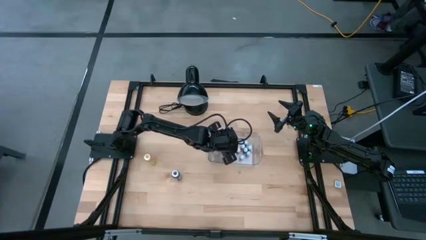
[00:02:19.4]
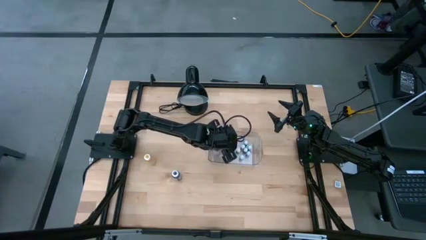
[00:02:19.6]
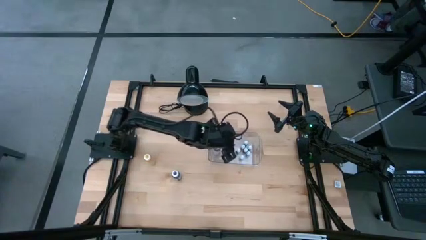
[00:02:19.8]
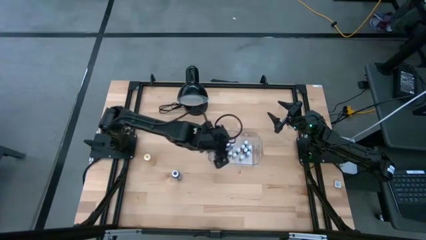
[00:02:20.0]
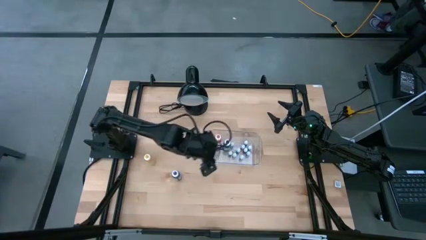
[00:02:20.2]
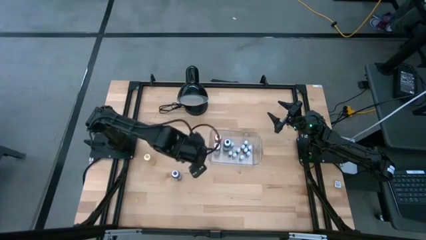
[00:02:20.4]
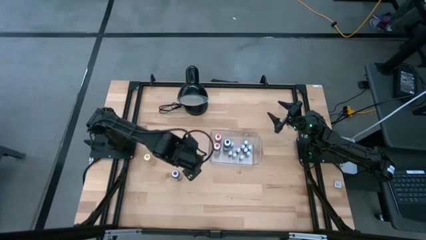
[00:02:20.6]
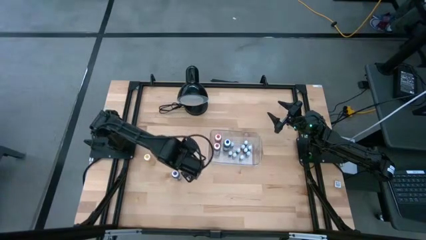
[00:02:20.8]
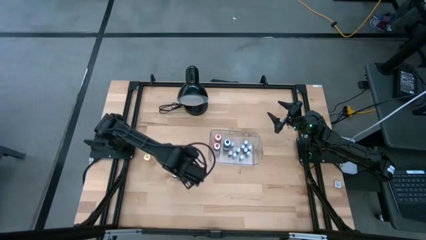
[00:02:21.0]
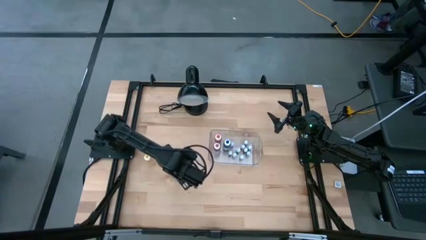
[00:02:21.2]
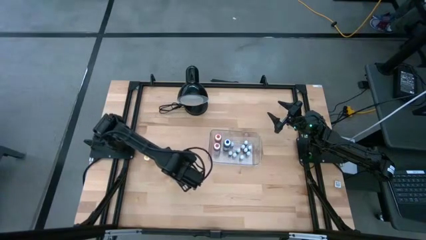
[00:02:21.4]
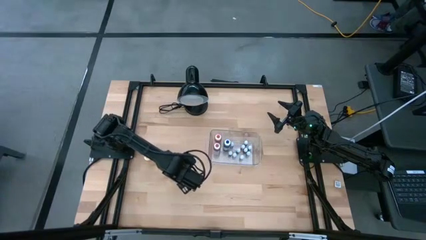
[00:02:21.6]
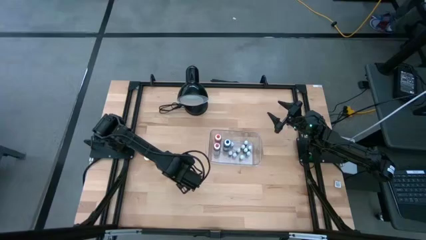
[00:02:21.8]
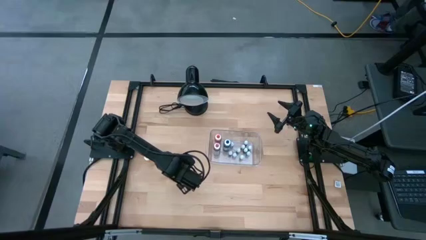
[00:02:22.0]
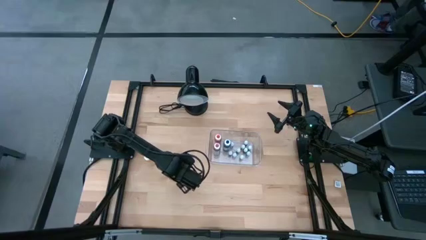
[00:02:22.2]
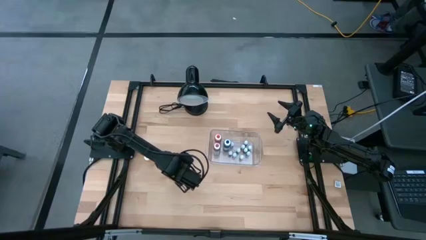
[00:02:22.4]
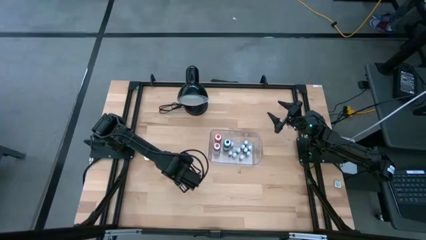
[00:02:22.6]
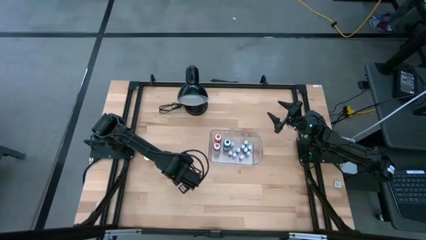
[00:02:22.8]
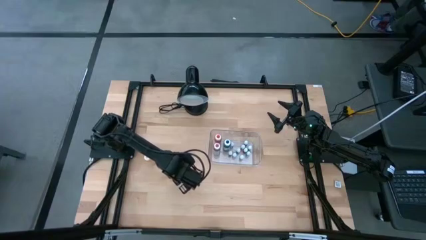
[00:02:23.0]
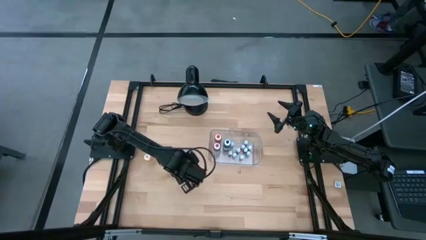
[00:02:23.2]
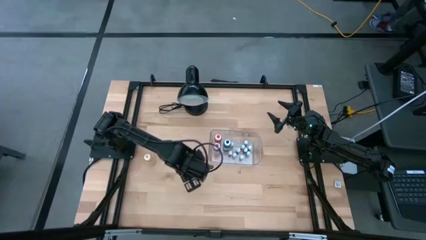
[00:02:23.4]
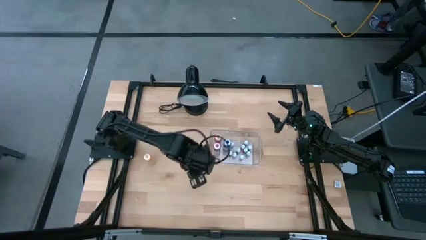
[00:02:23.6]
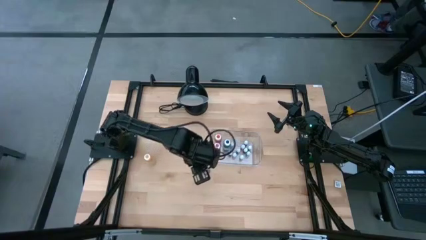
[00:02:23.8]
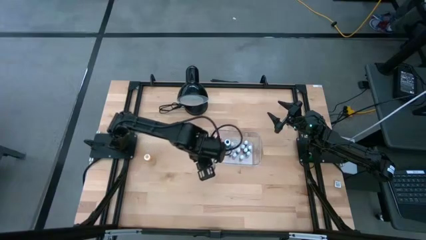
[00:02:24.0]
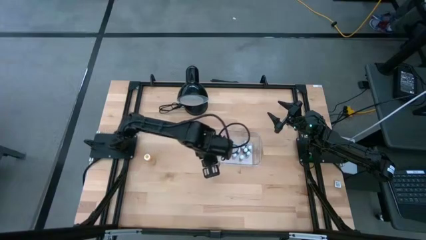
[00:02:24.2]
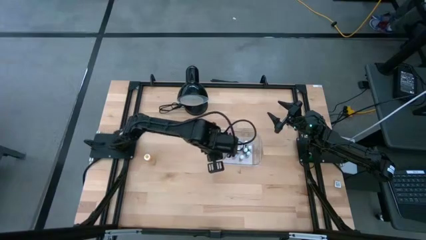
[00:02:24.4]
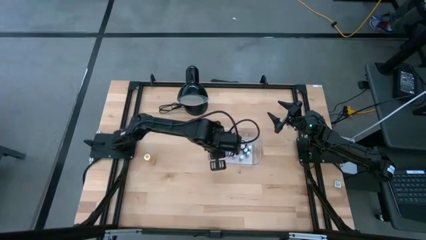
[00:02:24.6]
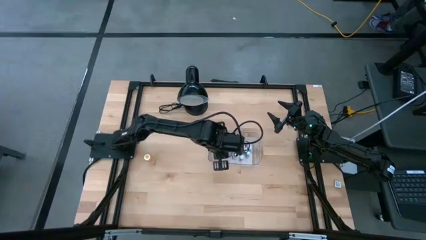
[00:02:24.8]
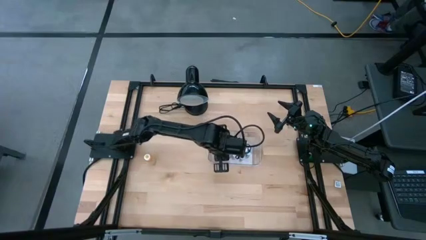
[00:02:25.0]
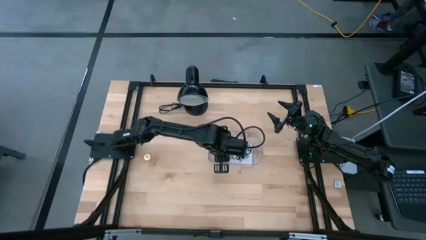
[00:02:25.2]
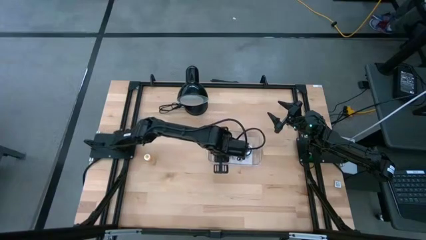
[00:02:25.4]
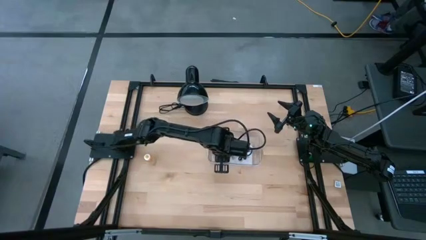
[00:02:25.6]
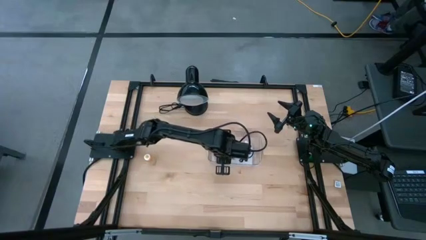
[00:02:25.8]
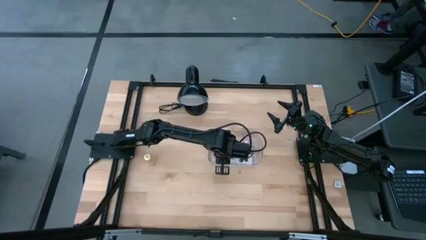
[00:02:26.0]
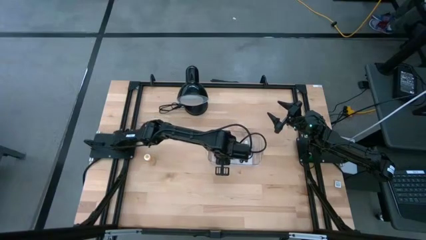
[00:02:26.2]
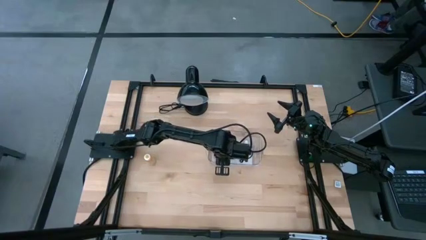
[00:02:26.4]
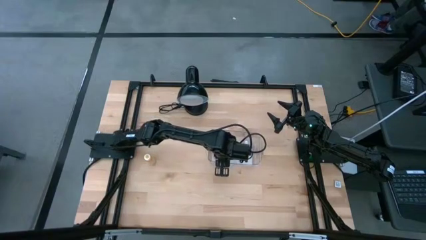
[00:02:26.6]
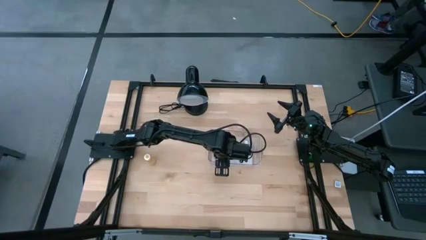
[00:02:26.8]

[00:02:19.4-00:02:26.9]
Task: Pick & Place food coloring
Put the big purple food coloring bottle into the transparent bin

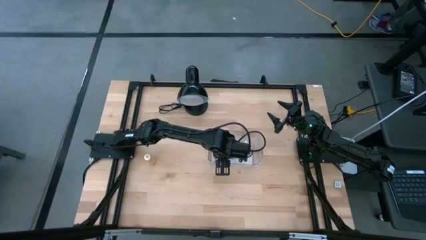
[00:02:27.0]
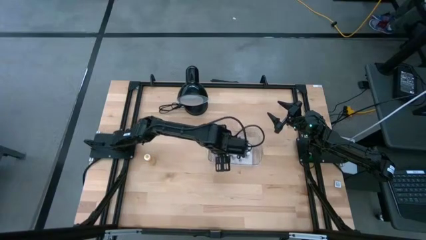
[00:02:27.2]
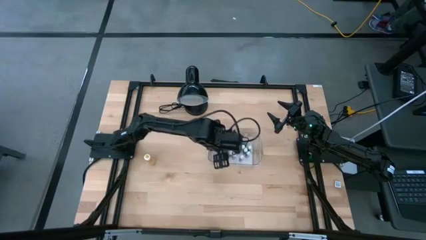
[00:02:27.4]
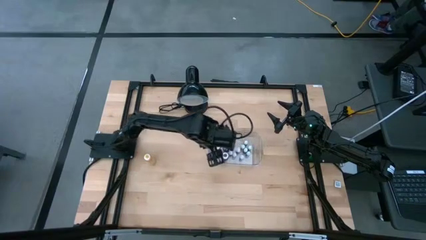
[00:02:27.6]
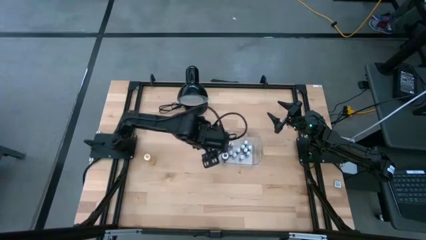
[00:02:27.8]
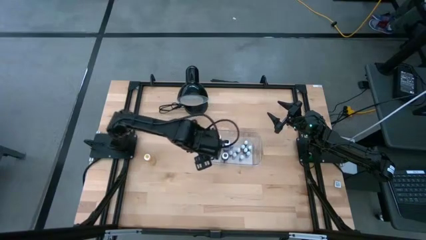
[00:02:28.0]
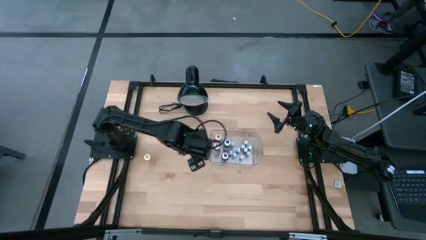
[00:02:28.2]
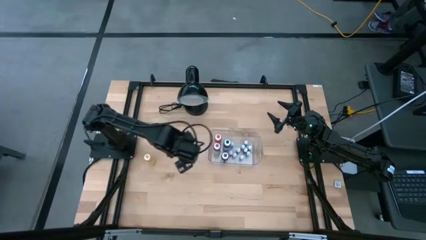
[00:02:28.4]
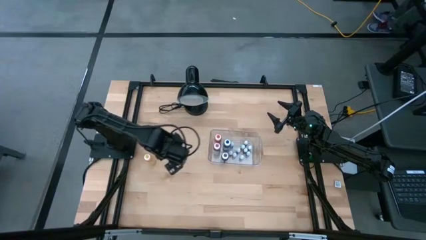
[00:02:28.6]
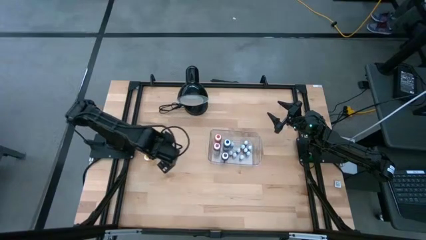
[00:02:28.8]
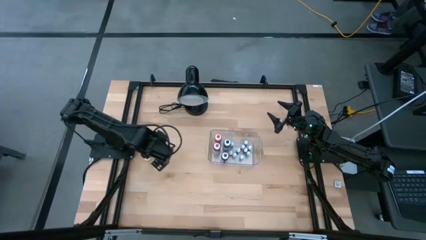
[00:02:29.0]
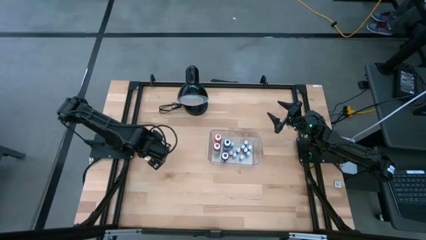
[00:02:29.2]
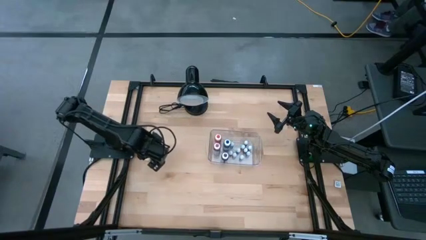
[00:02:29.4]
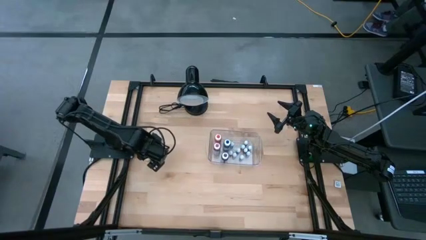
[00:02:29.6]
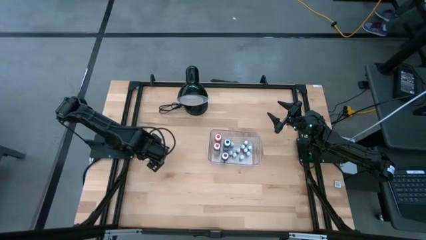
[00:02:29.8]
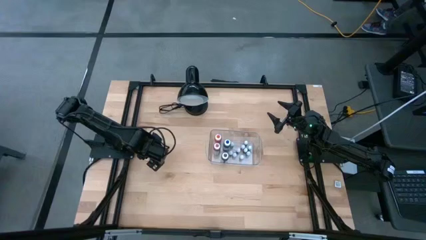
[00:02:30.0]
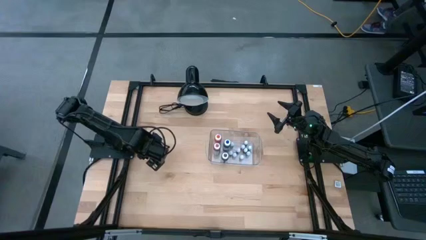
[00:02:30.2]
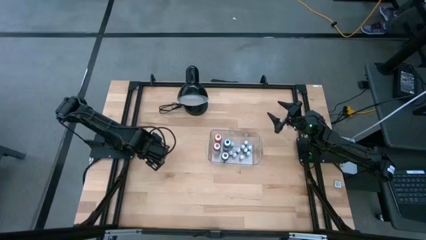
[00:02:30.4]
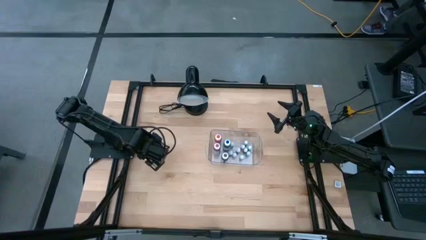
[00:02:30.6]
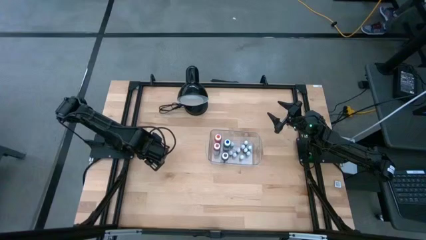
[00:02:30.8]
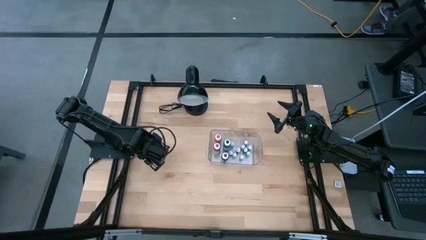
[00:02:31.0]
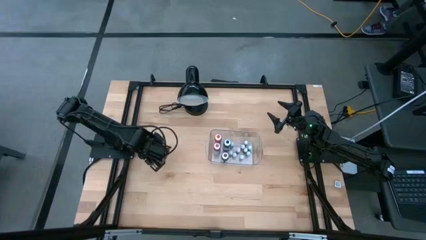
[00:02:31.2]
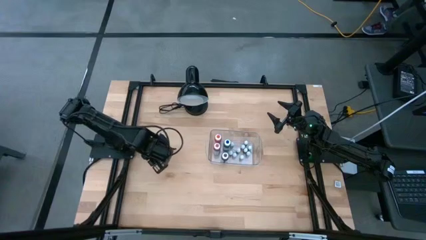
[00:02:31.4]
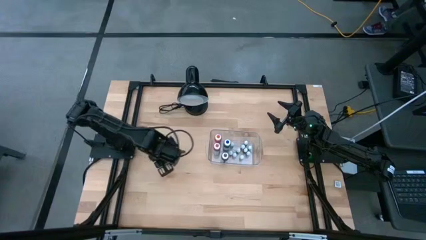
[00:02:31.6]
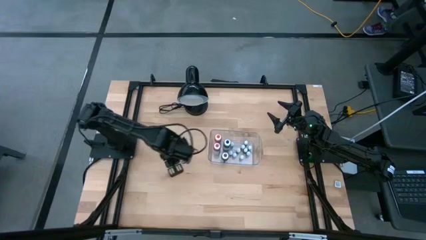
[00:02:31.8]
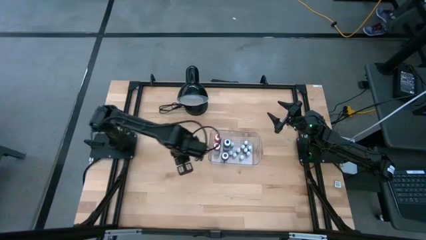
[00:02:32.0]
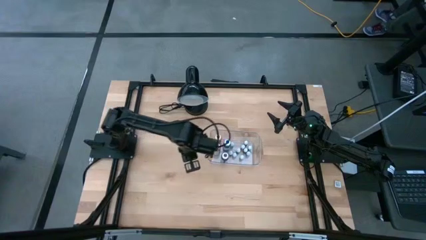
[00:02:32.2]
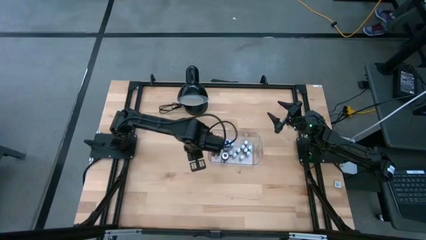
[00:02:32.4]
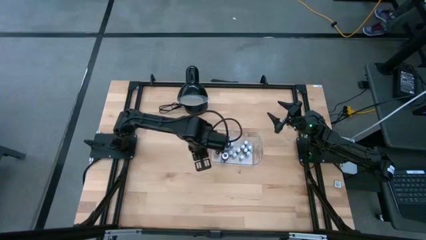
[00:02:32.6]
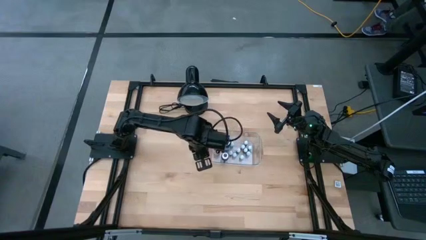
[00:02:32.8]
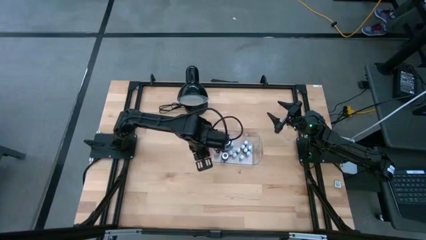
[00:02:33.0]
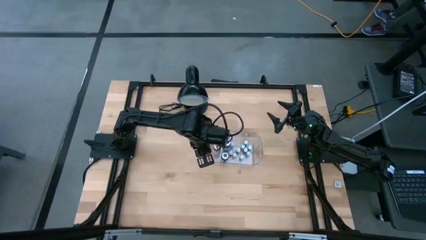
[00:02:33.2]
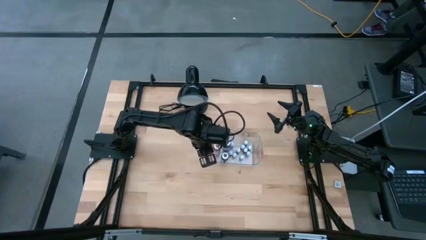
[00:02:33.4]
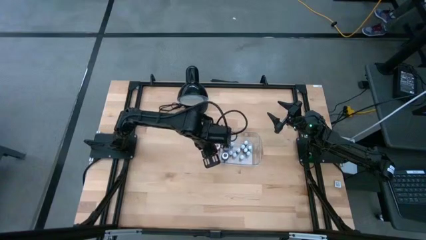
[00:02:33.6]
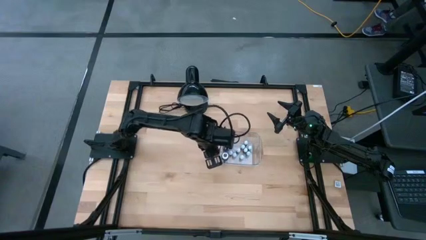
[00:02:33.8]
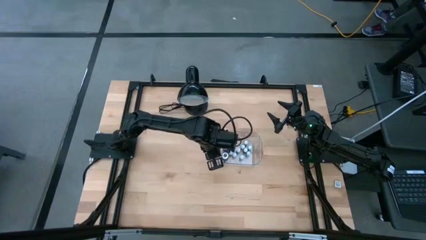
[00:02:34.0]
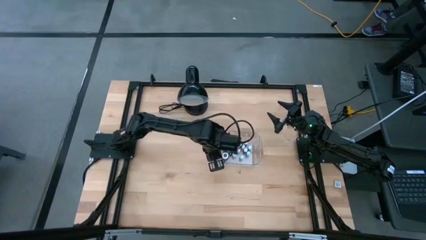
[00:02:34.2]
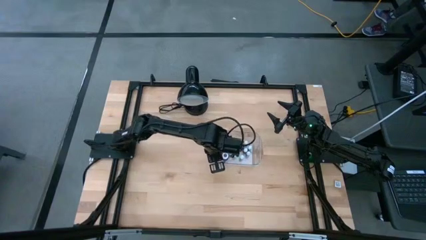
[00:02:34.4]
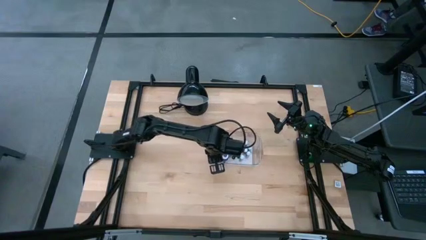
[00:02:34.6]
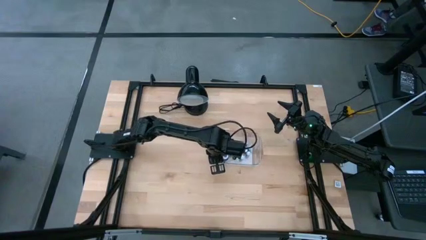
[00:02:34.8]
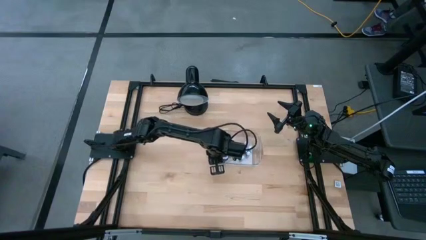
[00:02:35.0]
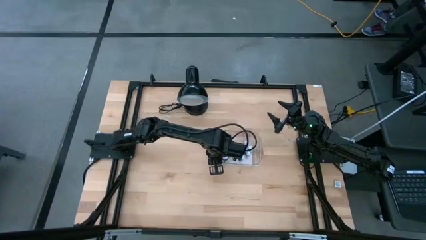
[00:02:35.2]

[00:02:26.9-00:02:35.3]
Put the big yellow food coloring bottle into the transparent bin
